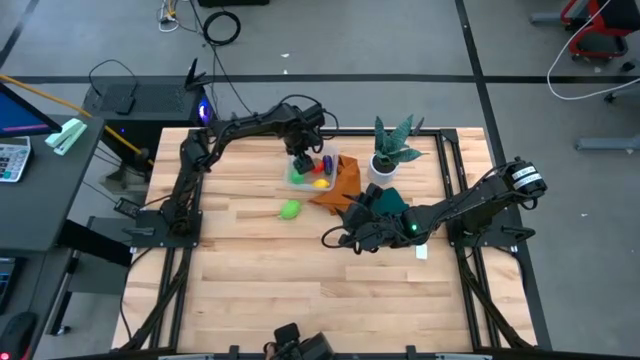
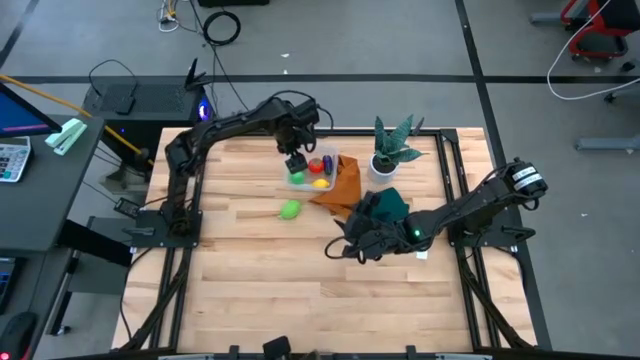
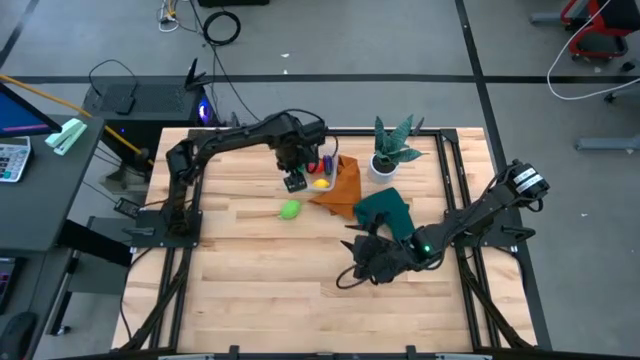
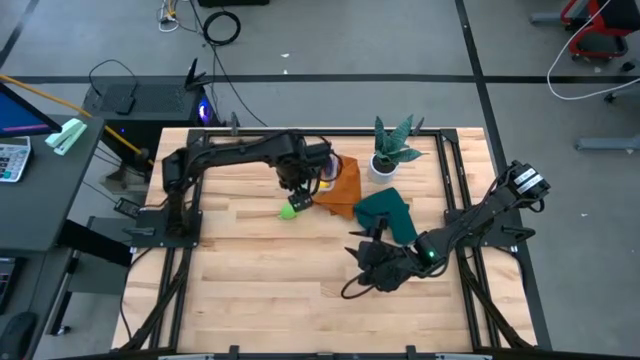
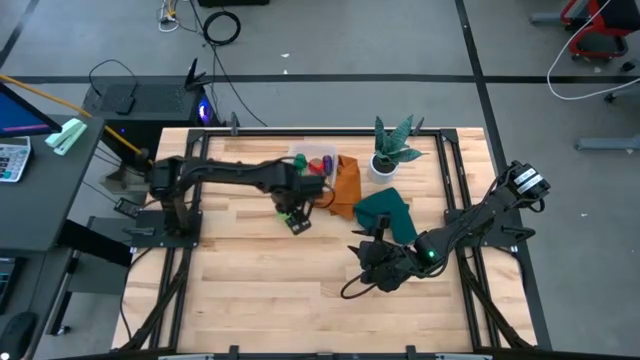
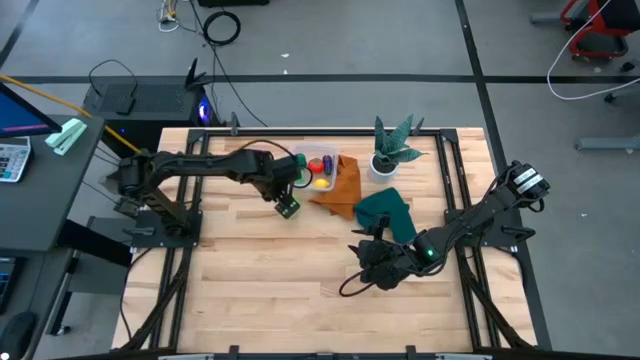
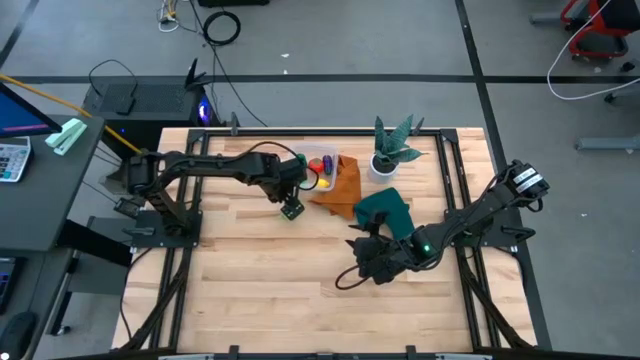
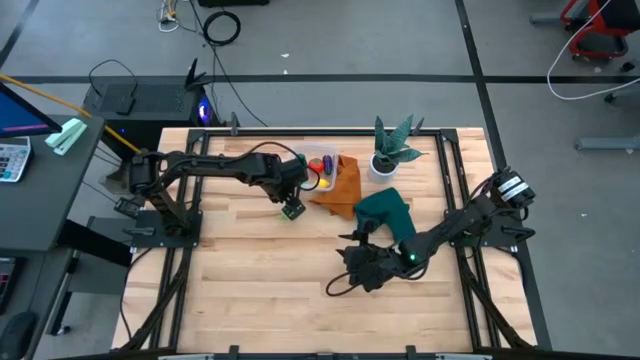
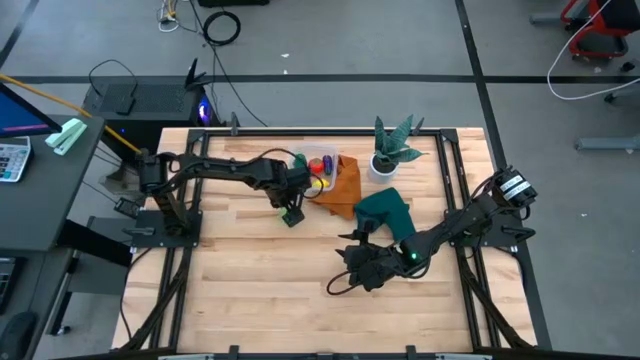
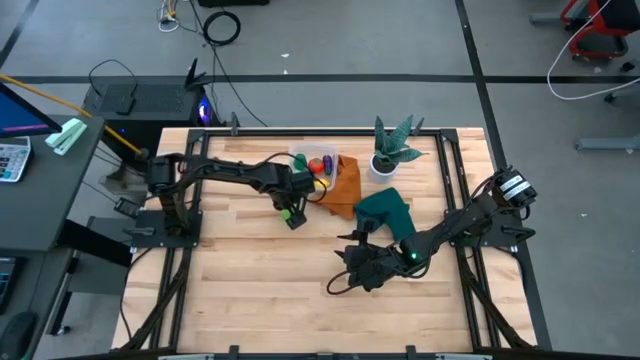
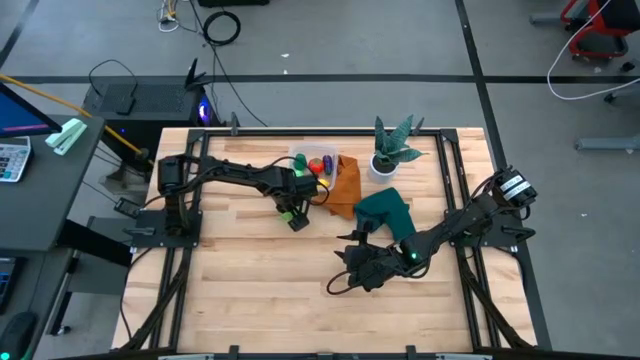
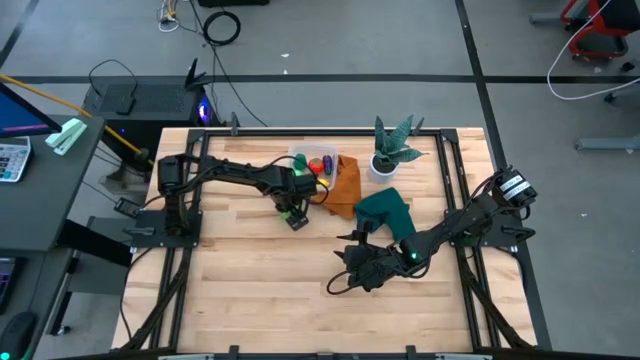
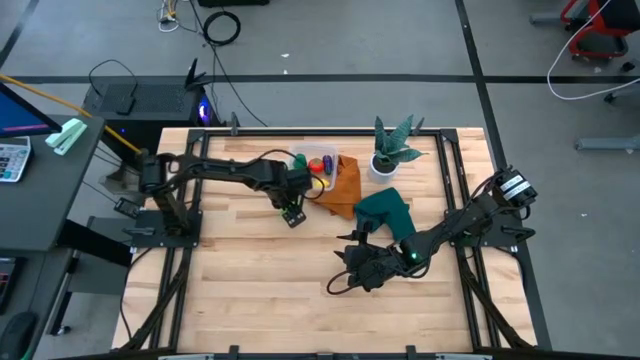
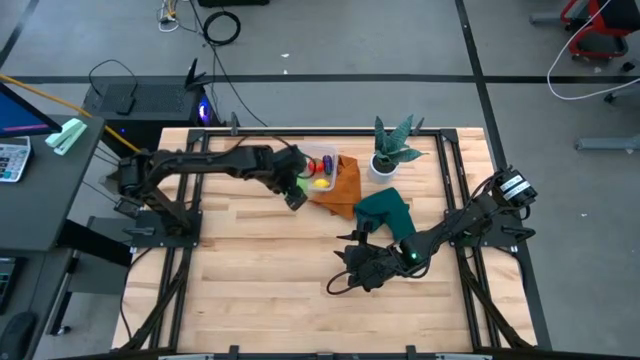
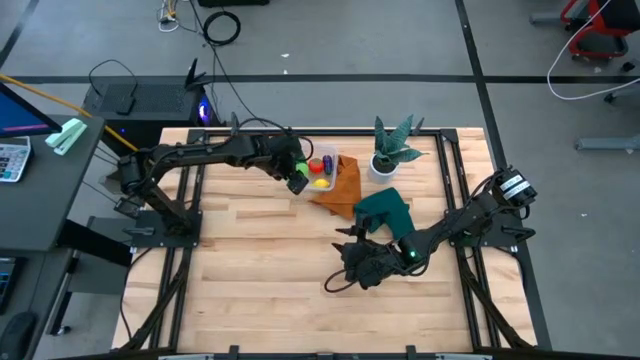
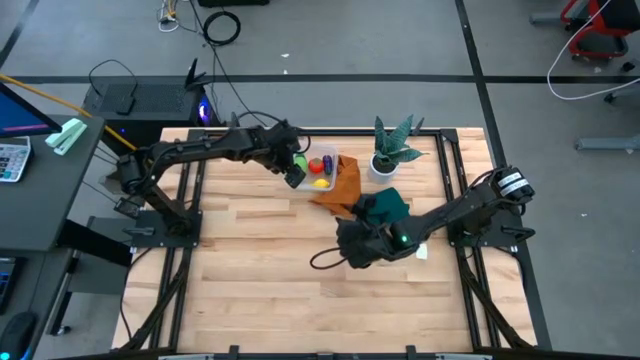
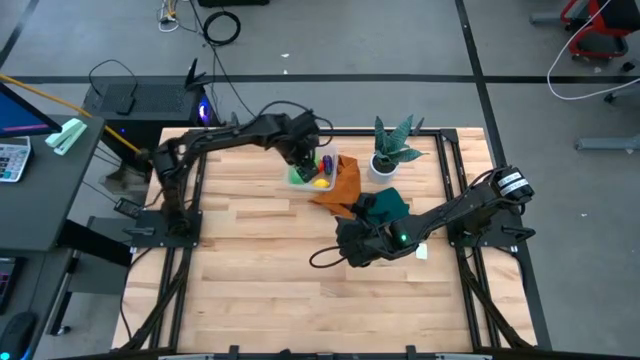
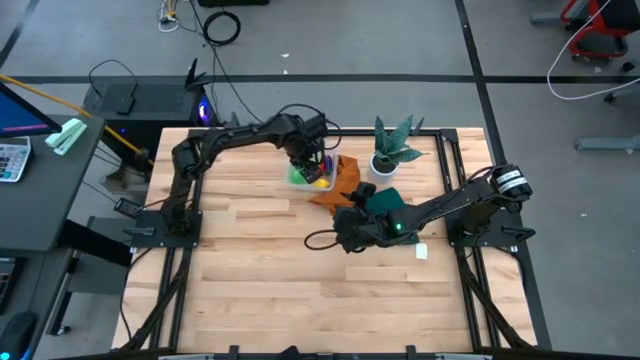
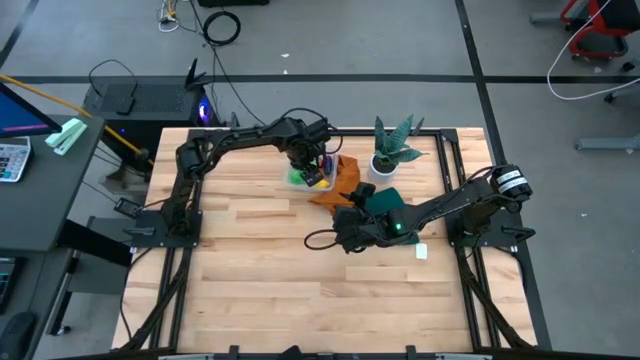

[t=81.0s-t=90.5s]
Task: Pick and placing Produce into tupperware
Put the green melon into the transparent container

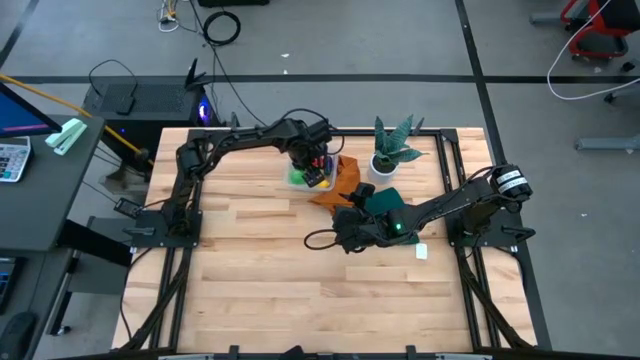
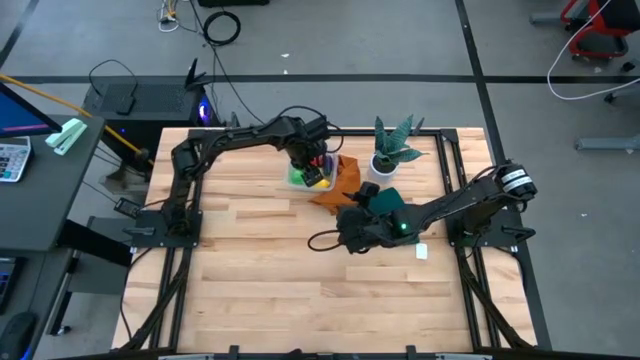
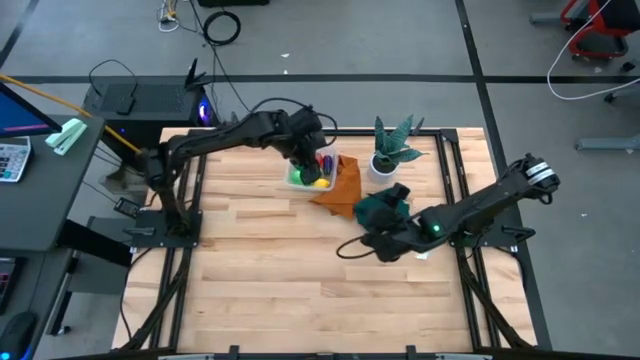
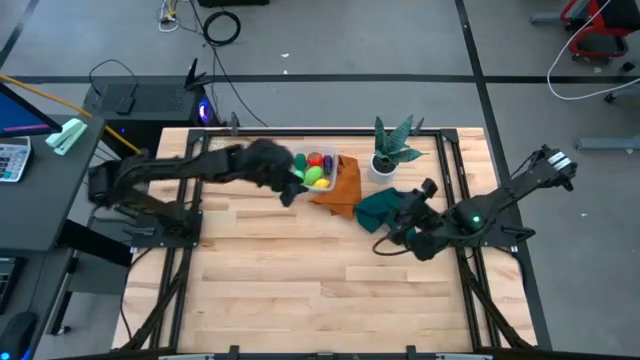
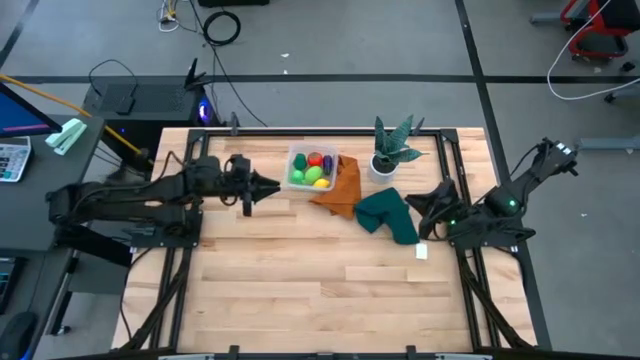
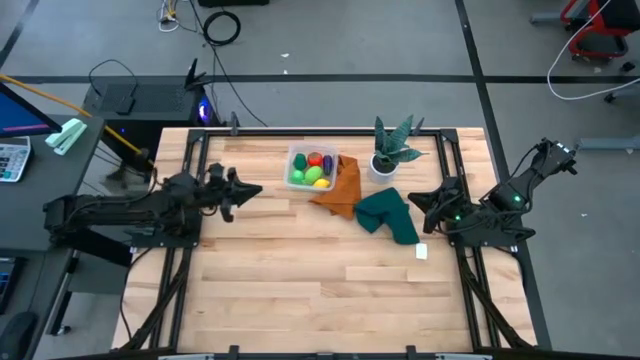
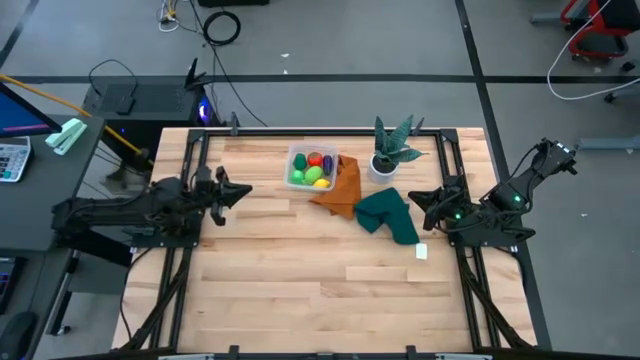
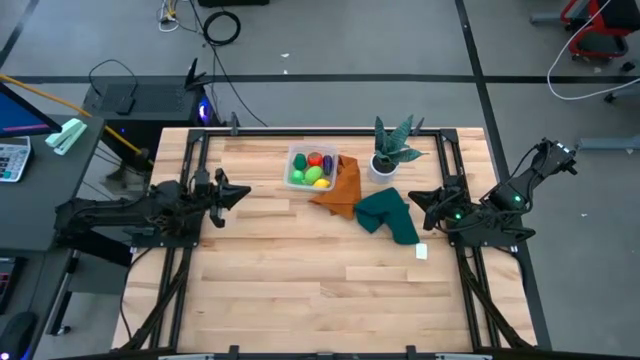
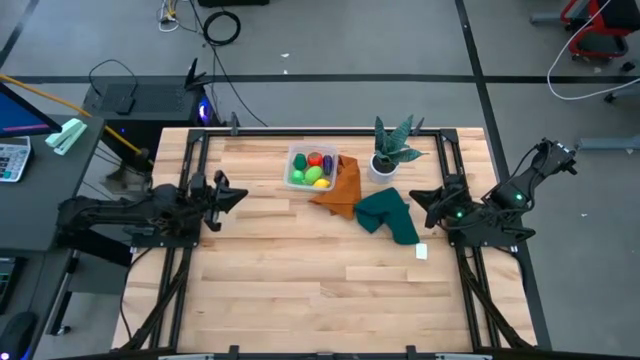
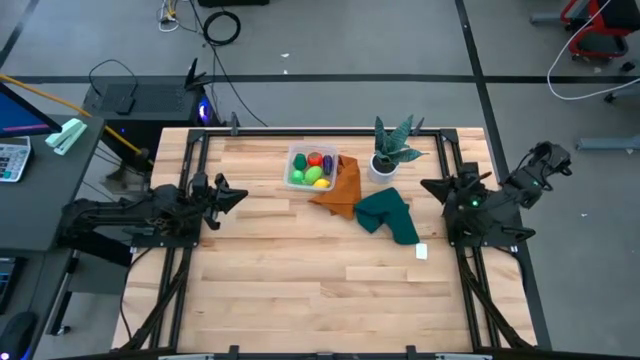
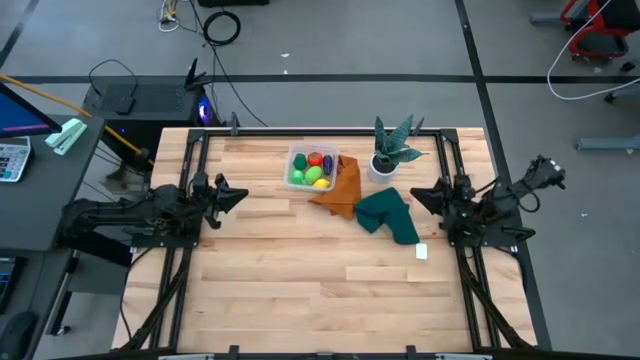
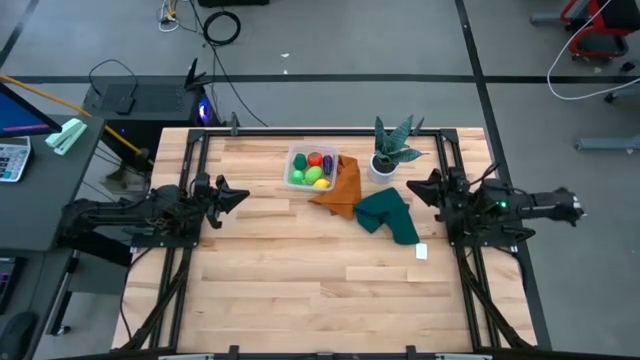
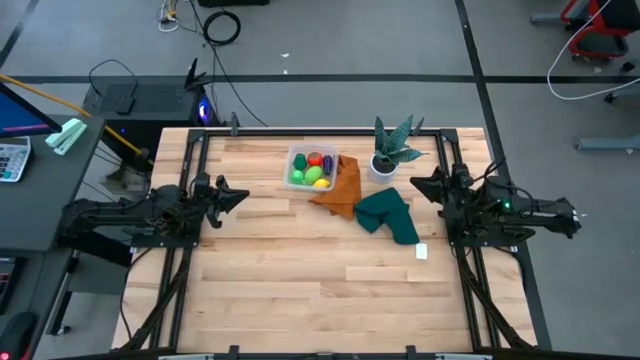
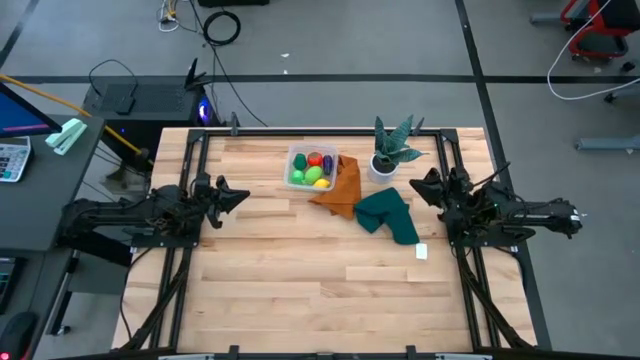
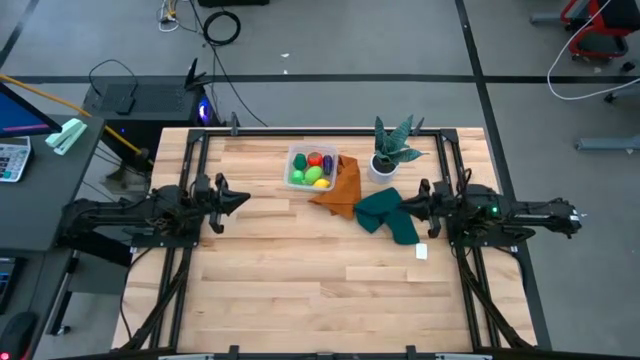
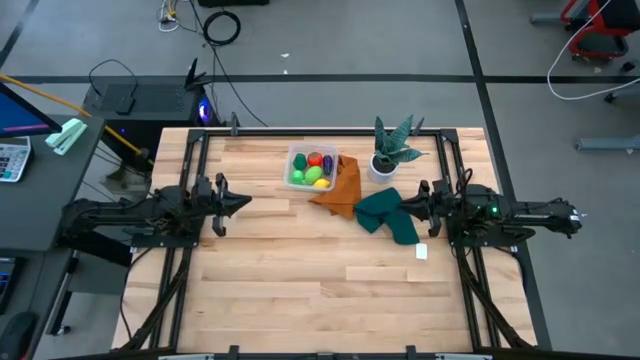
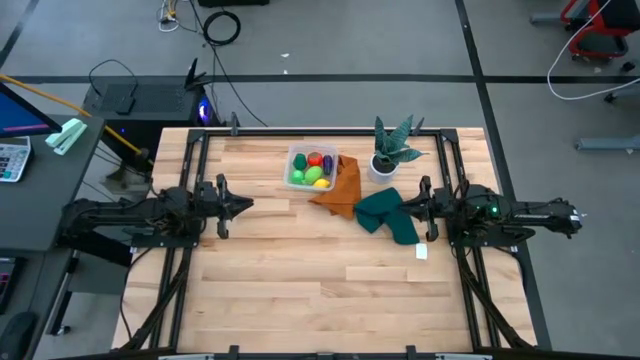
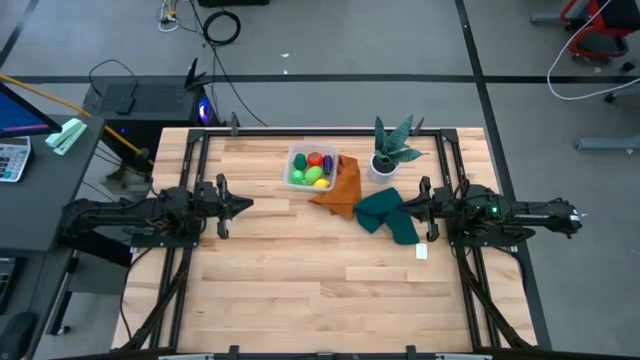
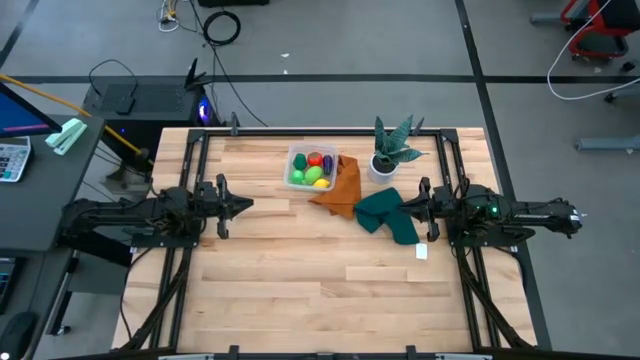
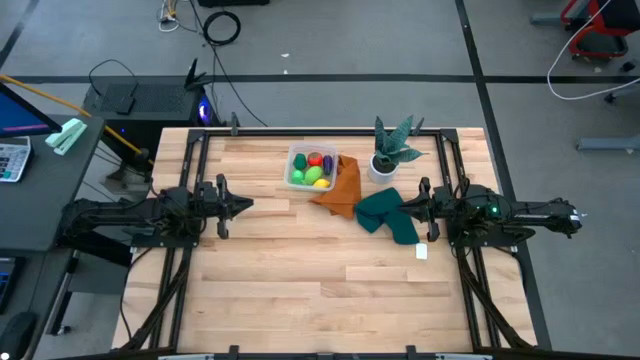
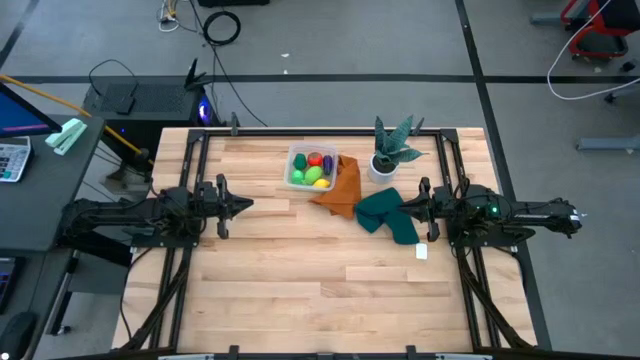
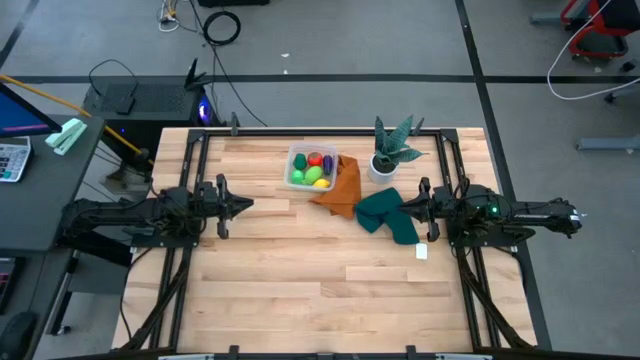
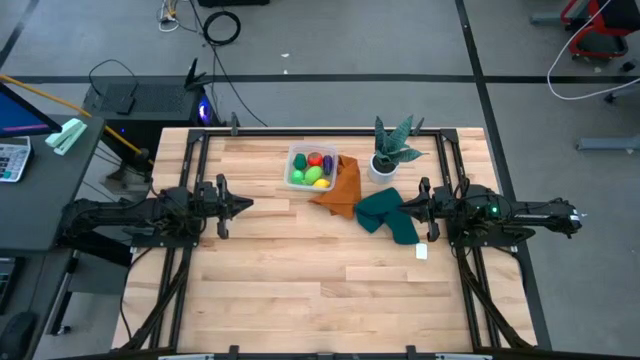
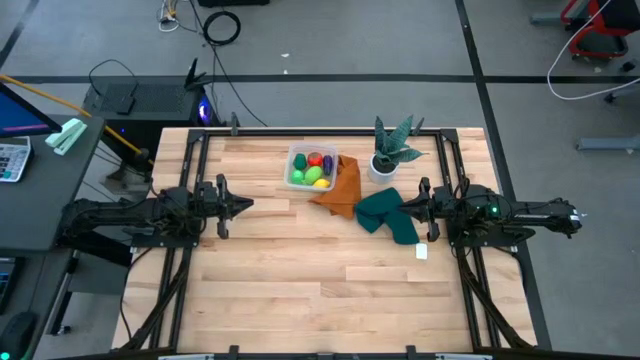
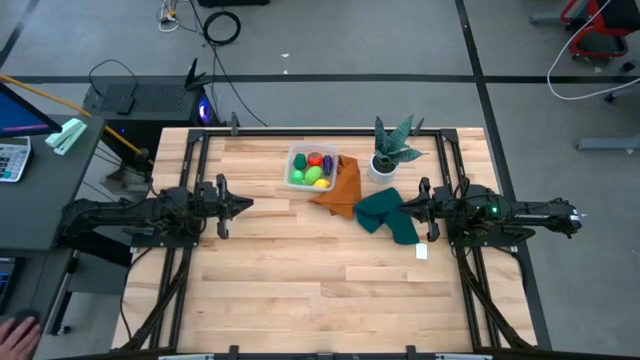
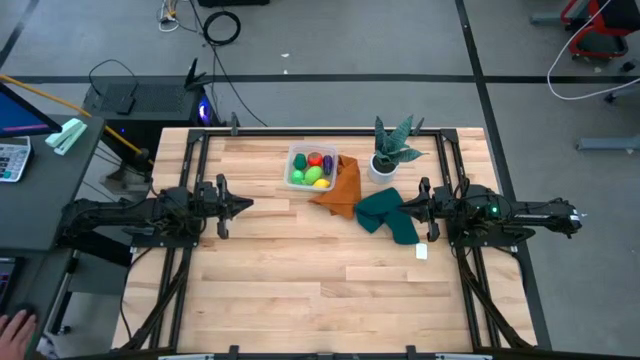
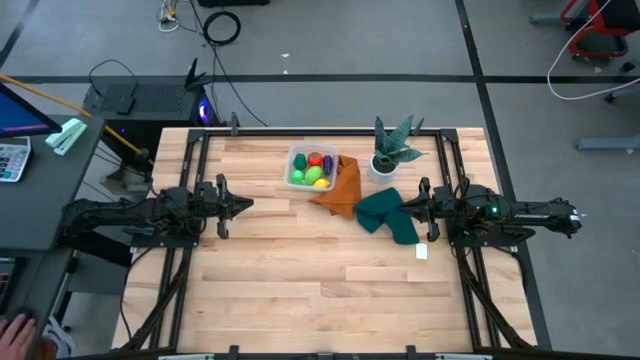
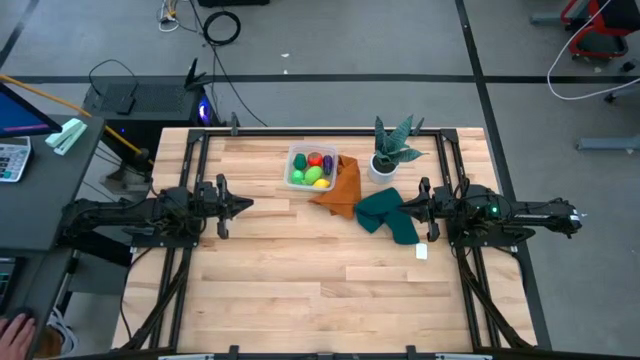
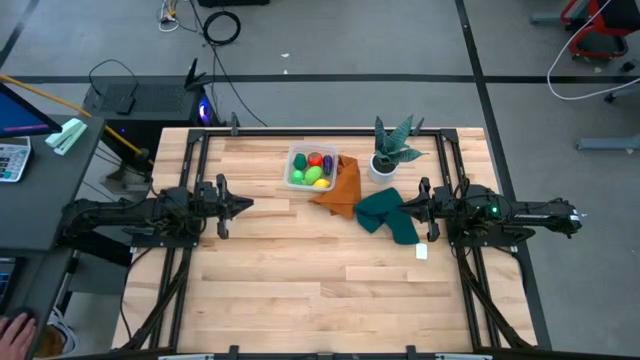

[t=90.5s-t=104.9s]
Return to Home Position
